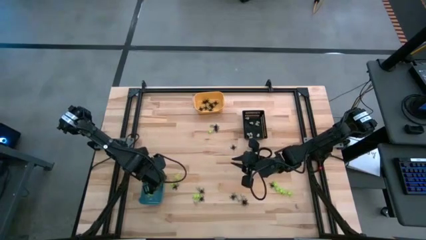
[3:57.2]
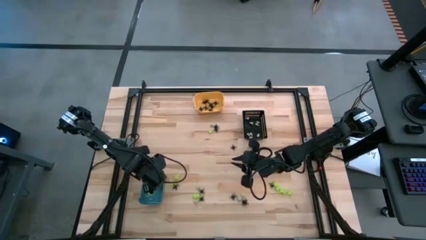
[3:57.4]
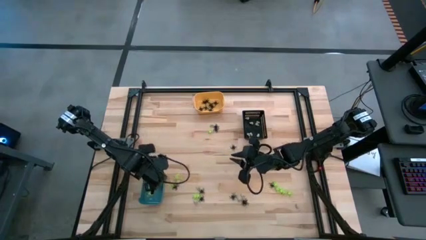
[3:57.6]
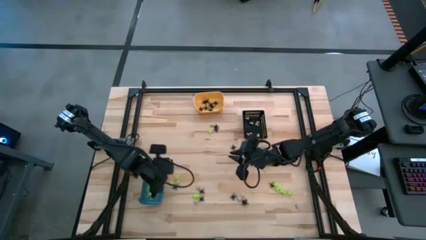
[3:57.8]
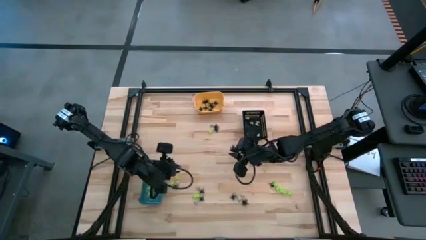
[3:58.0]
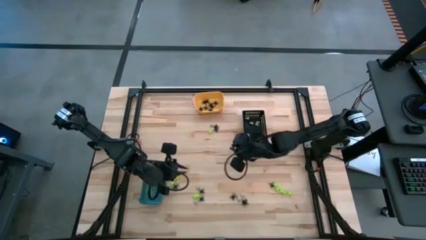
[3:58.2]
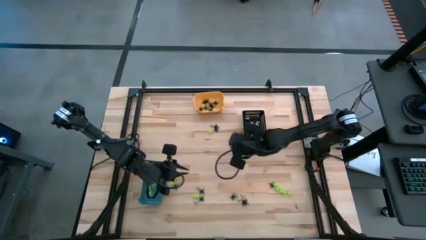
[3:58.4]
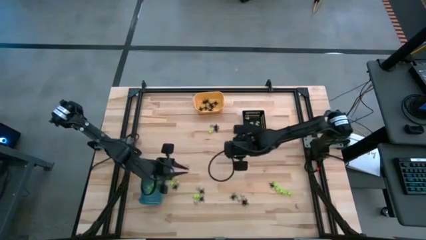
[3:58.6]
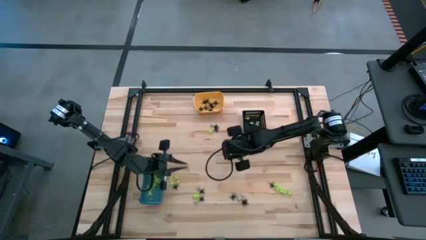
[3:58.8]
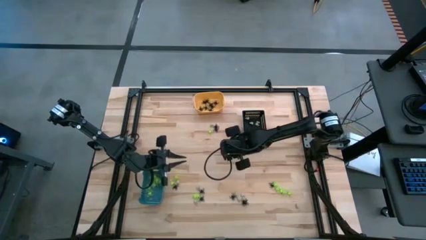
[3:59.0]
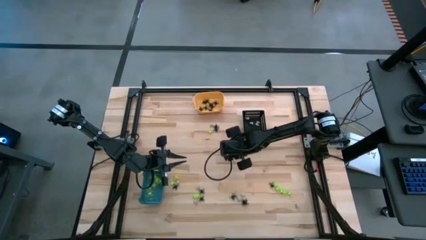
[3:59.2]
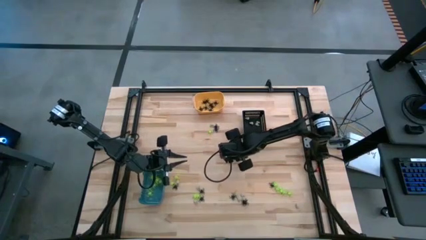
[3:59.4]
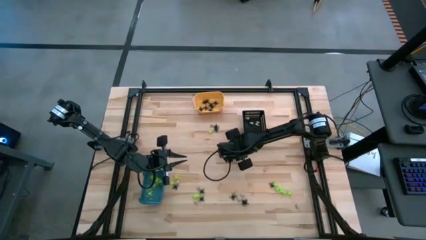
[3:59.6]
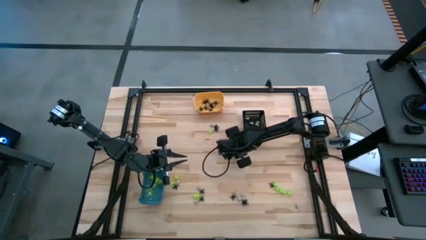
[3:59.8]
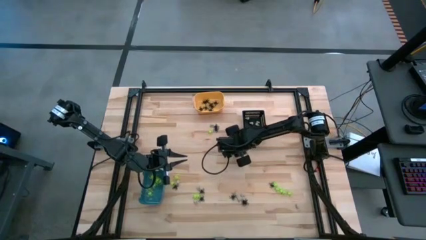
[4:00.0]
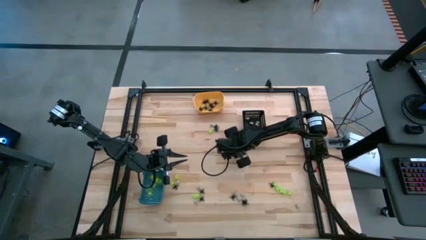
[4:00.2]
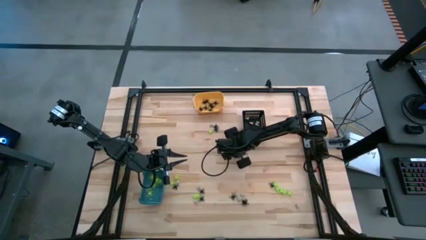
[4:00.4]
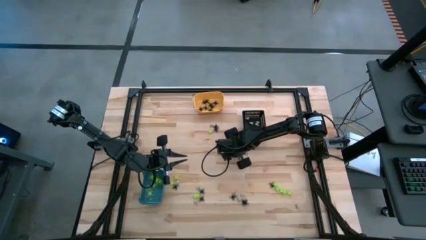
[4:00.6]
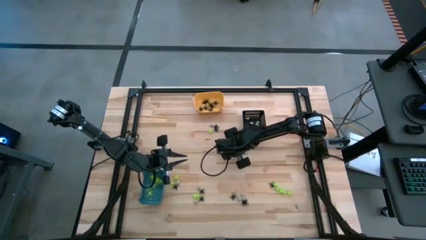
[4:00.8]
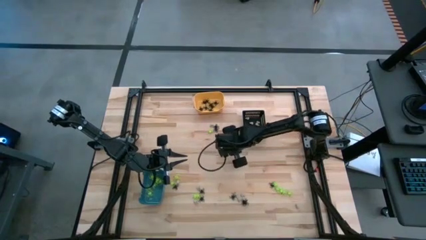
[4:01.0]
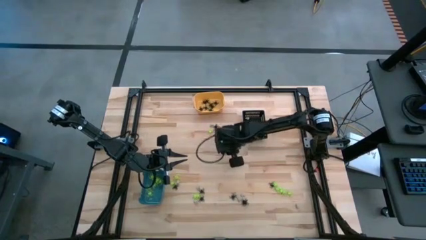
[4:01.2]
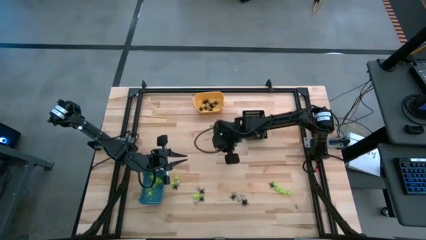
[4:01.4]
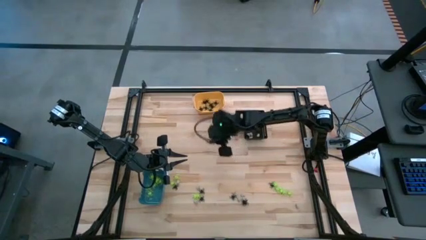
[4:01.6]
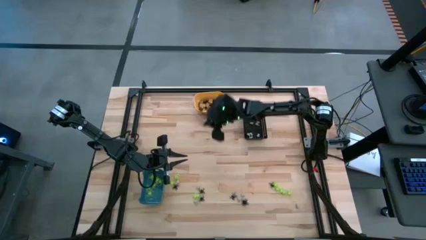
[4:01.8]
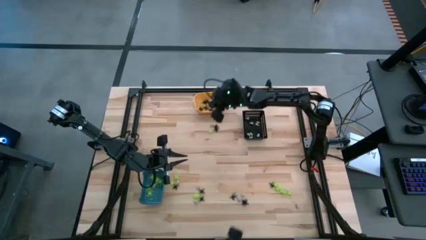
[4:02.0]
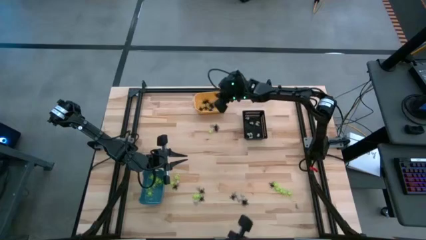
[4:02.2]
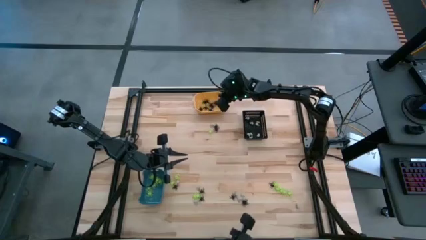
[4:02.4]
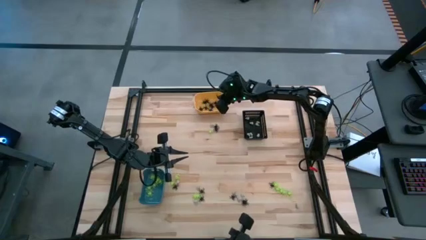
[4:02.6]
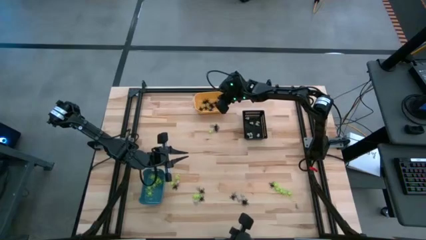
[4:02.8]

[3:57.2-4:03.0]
Task: Sort Halloween decoration
Put the black spider toy into the yellow bin

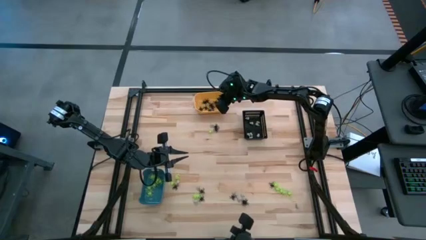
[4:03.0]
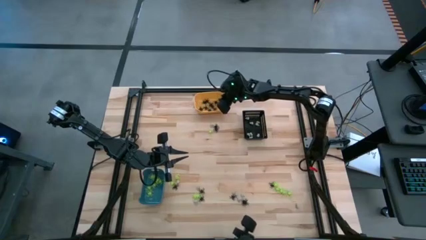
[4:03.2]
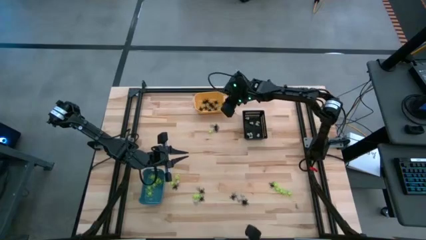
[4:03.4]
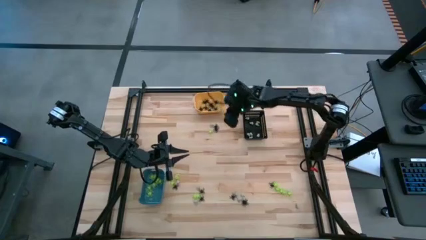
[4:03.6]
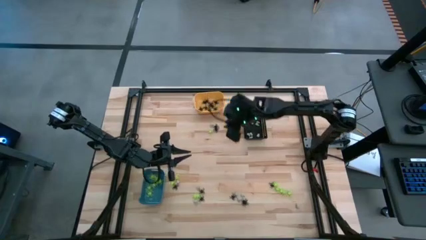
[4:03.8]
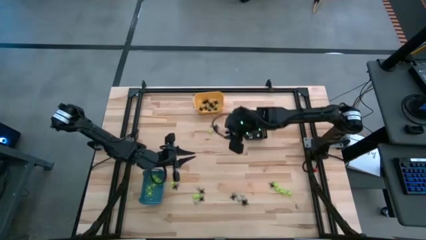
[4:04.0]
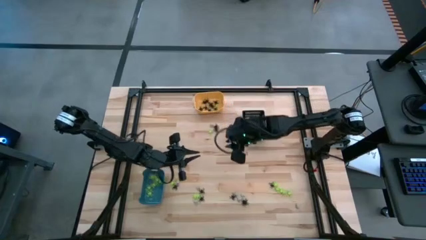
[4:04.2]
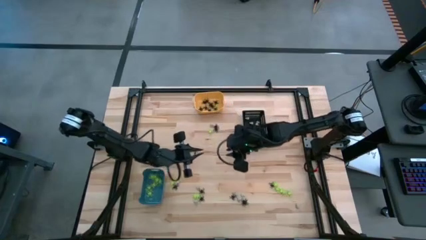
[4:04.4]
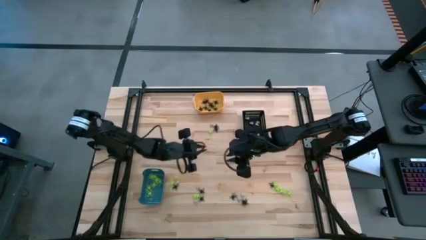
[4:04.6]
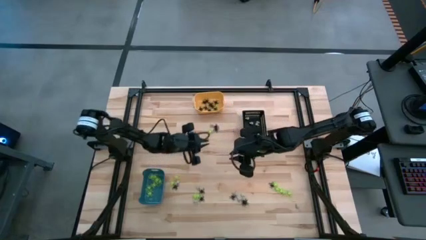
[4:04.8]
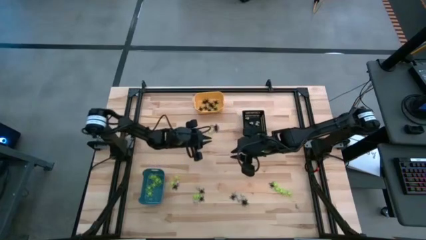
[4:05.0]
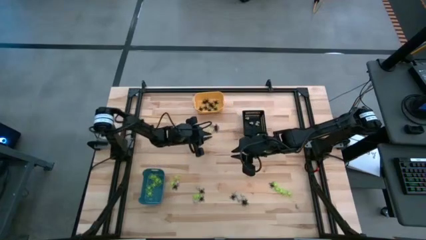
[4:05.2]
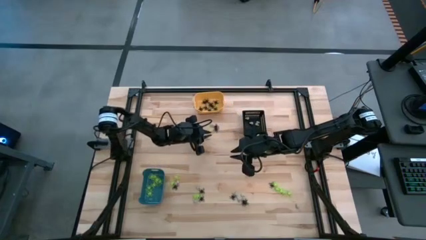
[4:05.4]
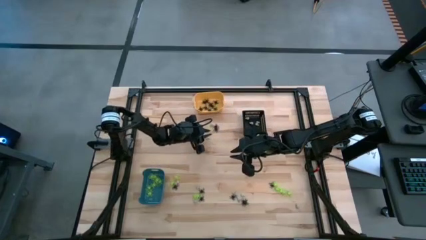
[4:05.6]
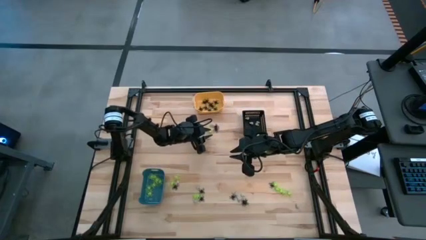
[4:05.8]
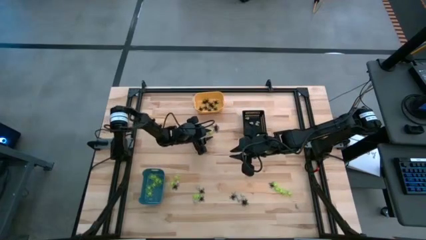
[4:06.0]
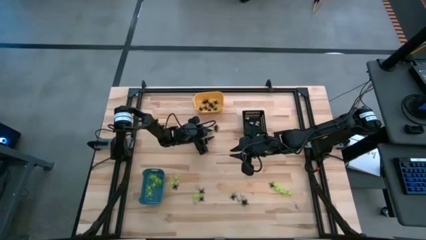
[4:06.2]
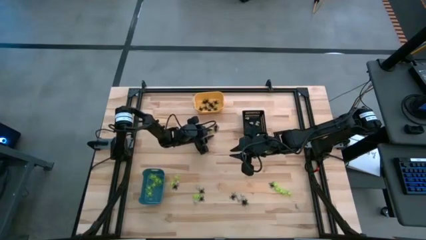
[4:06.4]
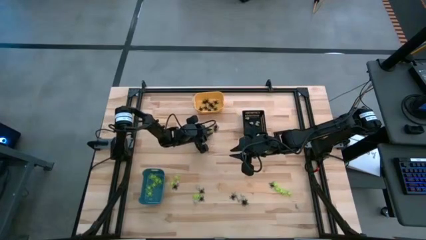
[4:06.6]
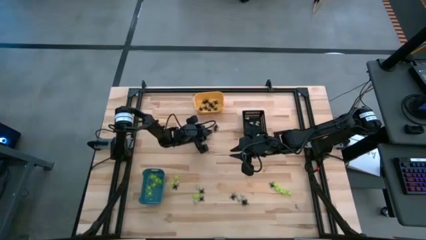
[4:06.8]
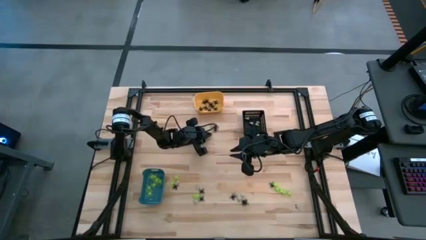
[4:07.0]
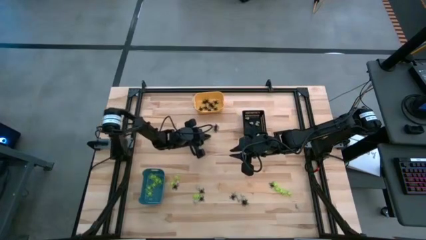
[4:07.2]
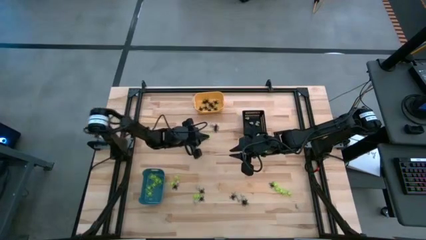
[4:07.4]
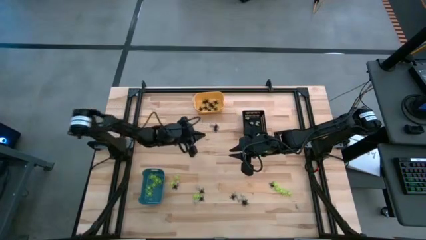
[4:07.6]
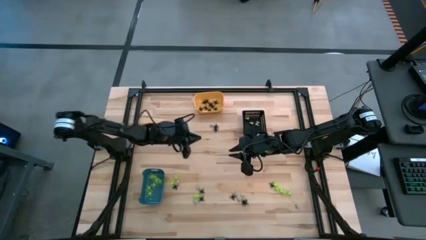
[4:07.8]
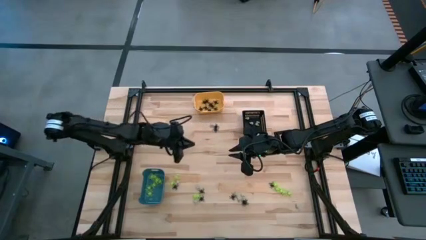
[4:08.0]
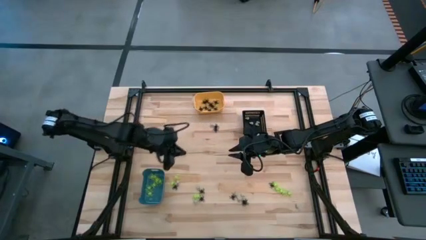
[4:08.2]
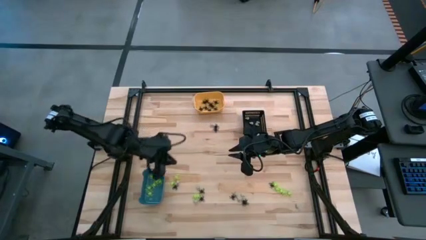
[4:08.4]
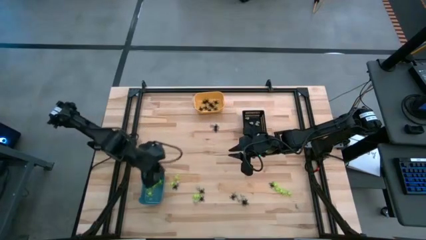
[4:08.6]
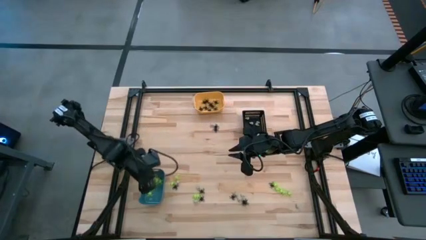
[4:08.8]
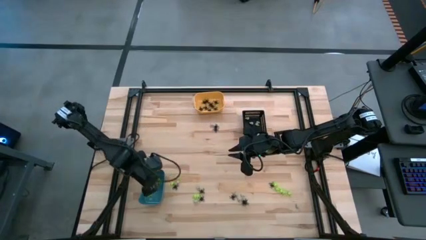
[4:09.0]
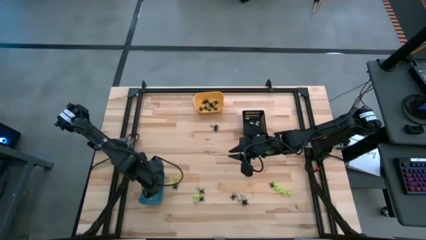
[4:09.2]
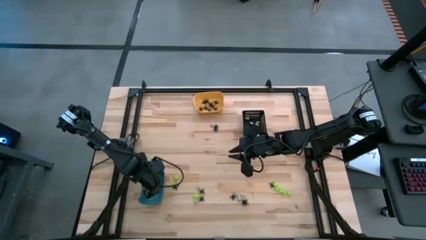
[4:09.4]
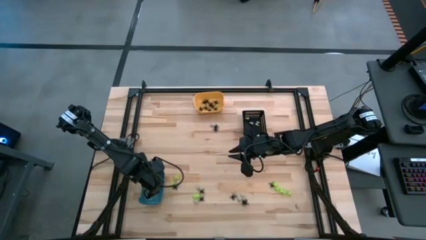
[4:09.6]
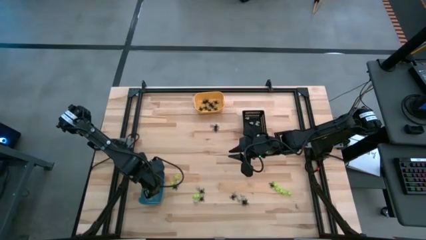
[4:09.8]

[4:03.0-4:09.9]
Put the green spider toy into the blue bin

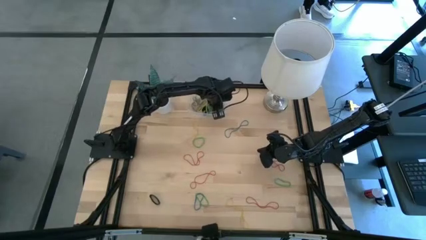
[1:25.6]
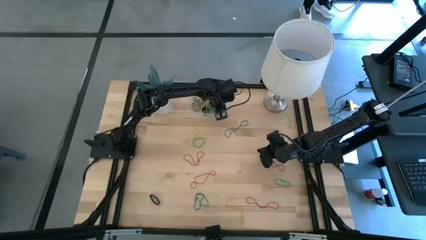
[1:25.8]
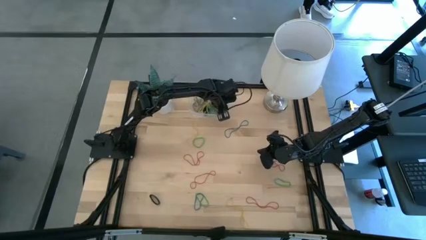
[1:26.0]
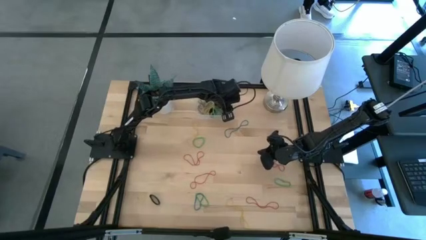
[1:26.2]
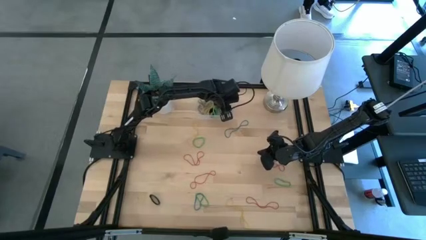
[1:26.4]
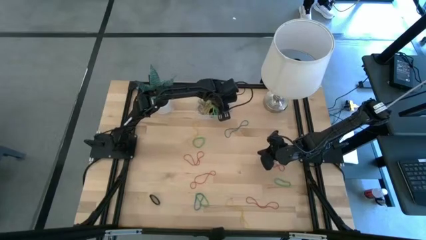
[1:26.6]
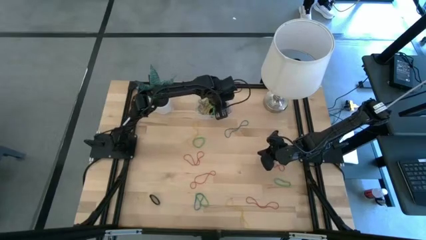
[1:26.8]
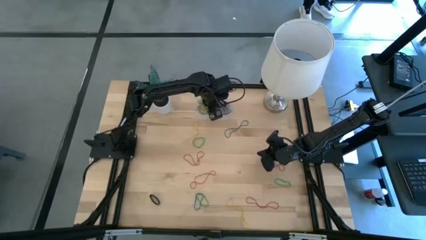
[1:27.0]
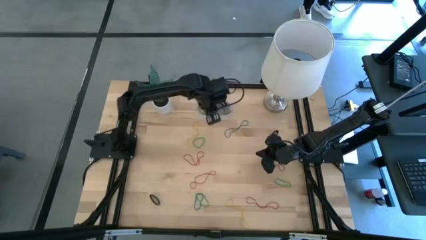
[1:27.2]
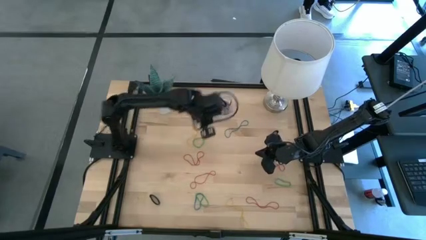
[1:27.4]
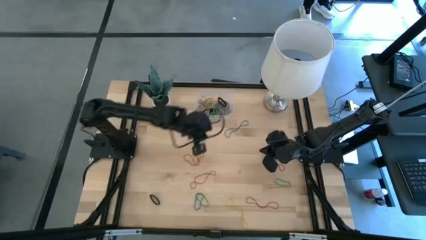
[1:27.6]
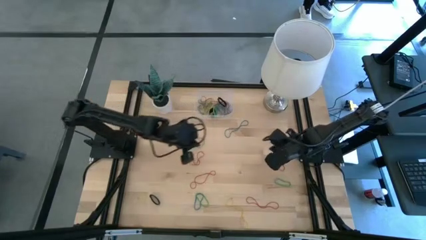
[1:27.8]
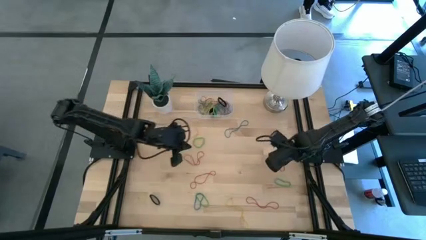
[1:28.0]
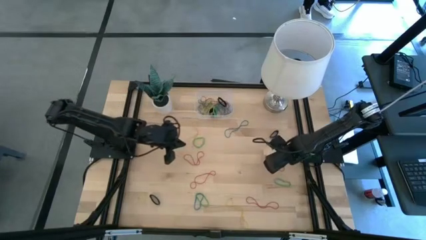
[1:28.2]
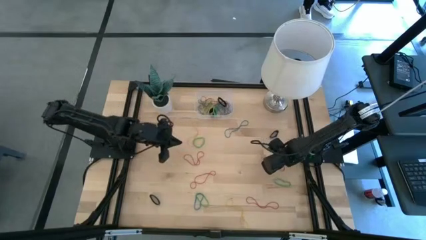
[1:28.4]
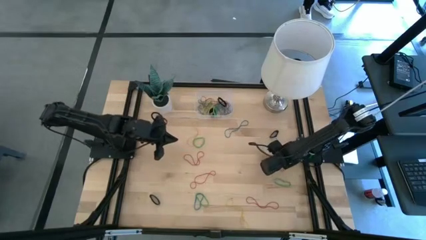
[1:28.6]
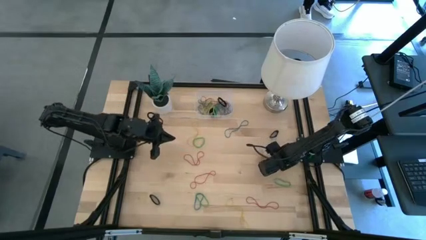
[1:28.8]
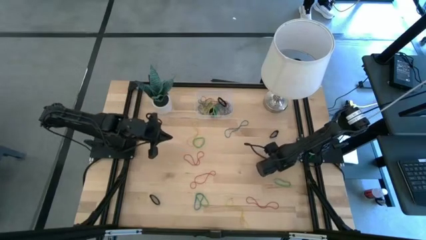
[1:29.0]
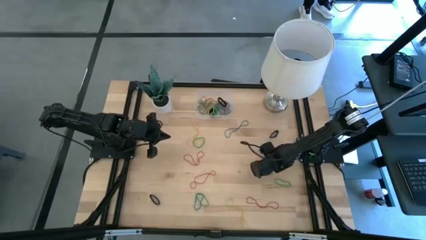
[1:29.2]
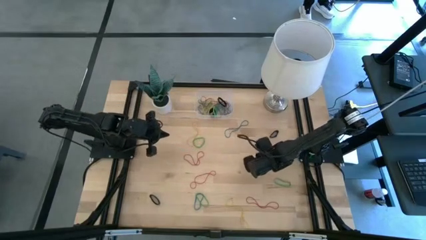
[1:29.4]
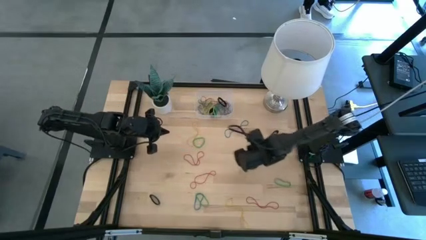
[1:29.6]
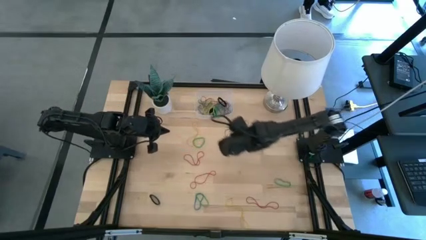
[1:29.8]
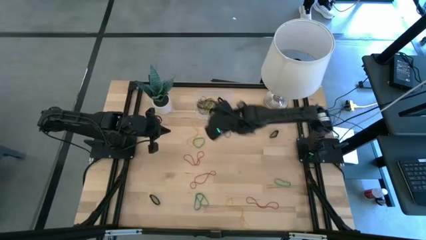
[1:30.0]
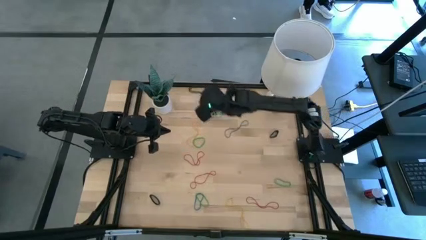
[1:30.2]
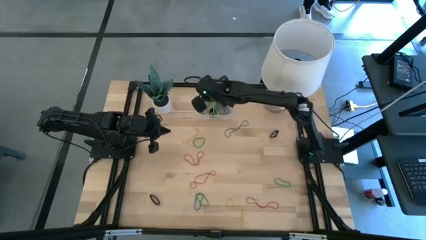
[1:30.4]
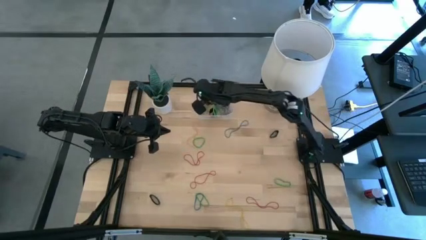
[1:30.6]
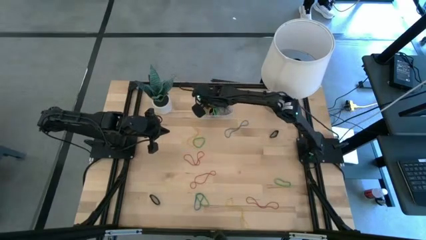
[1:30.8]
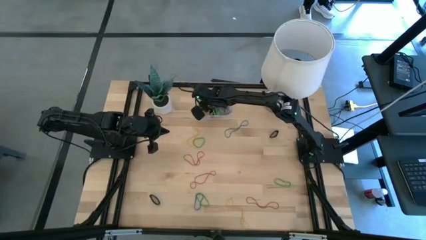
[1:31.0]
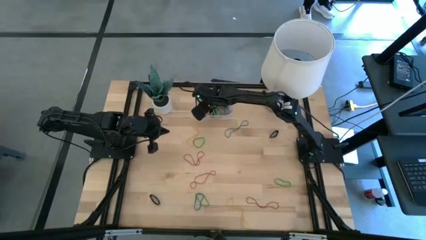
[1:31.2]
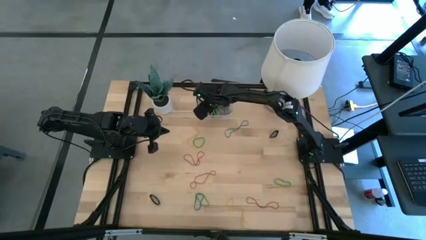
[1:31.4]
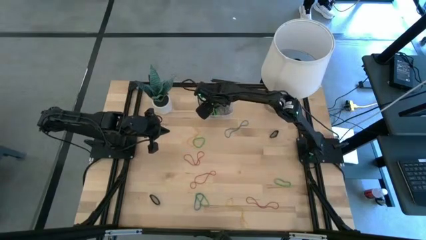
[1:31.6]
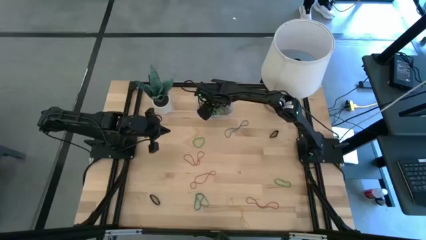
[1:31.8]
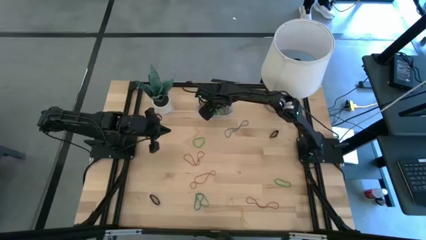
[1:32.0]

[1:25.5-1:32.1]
Task: Pick and place rubber bands into bin
Put the red rubber band into the transparent bin
